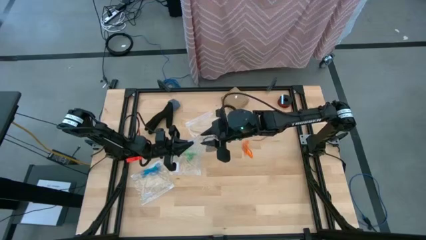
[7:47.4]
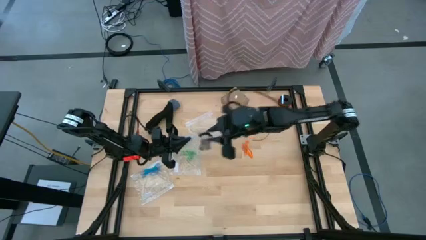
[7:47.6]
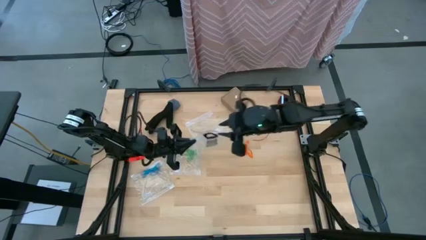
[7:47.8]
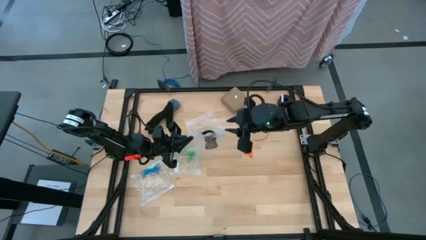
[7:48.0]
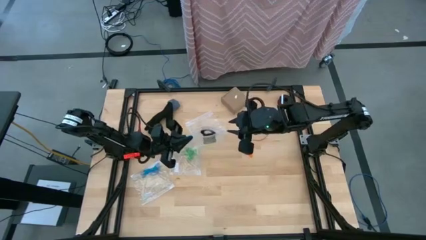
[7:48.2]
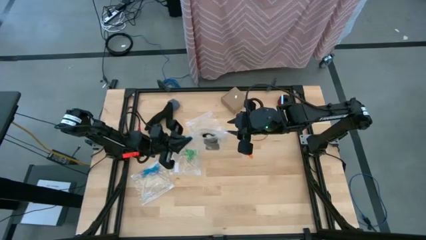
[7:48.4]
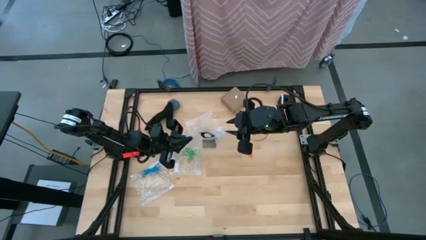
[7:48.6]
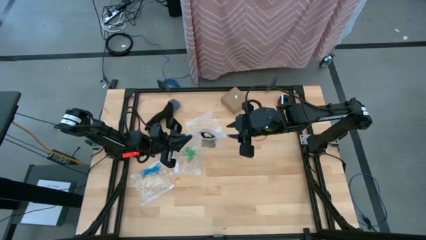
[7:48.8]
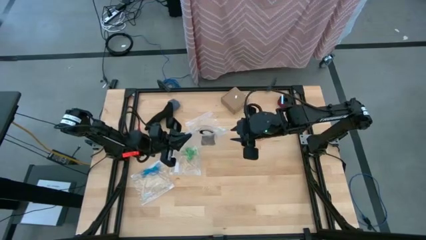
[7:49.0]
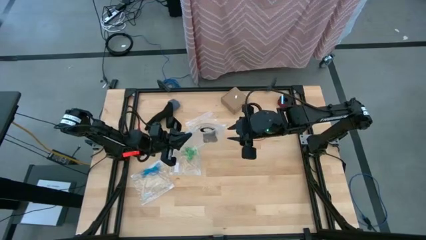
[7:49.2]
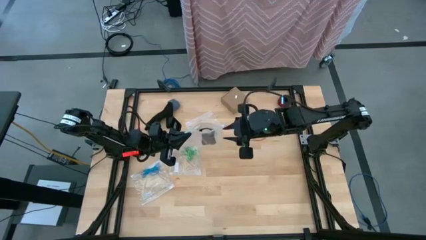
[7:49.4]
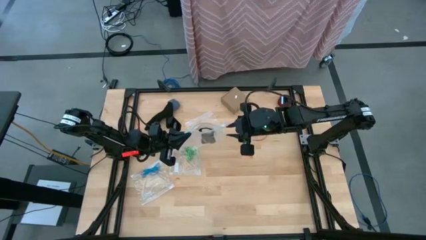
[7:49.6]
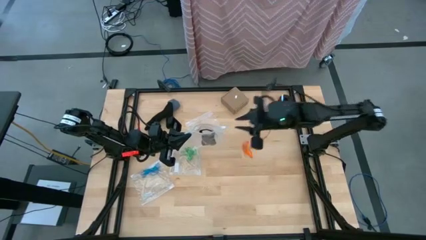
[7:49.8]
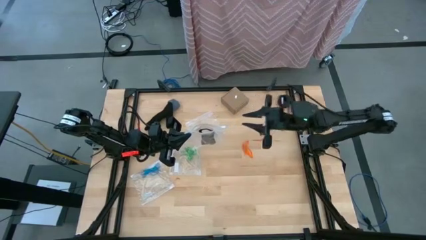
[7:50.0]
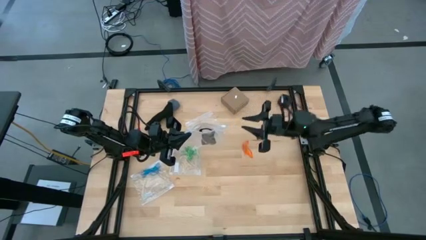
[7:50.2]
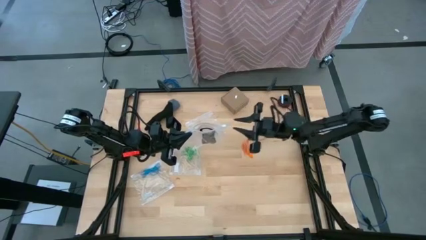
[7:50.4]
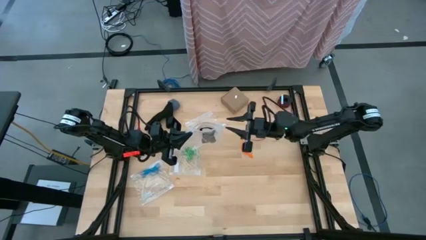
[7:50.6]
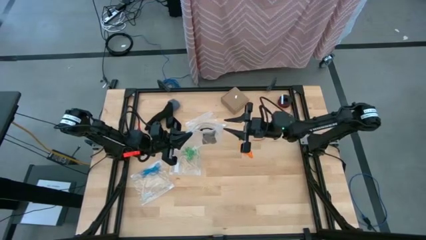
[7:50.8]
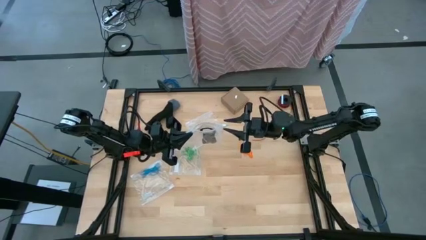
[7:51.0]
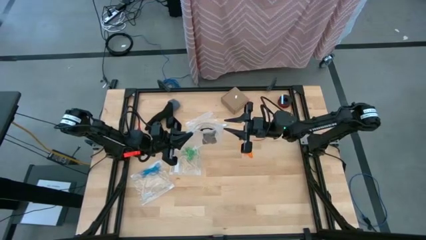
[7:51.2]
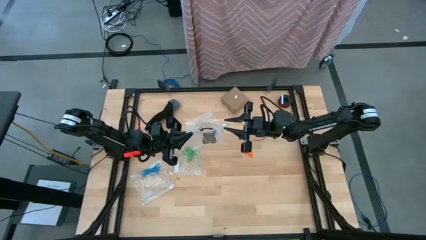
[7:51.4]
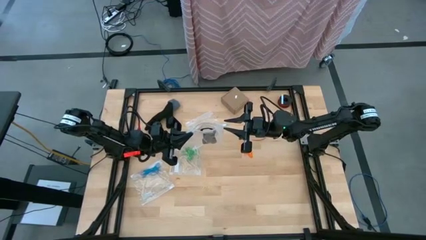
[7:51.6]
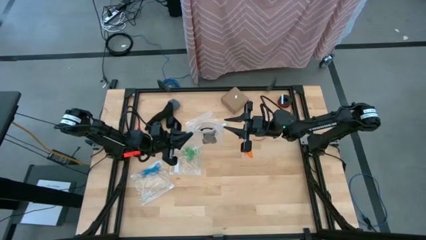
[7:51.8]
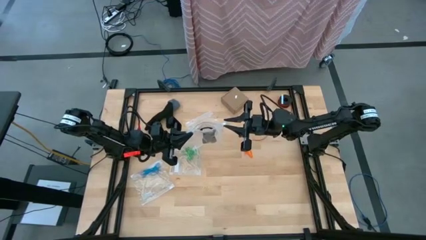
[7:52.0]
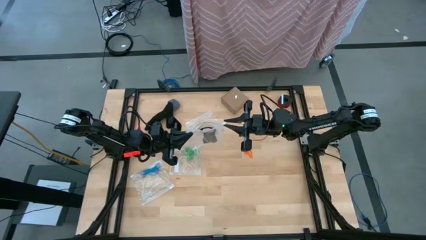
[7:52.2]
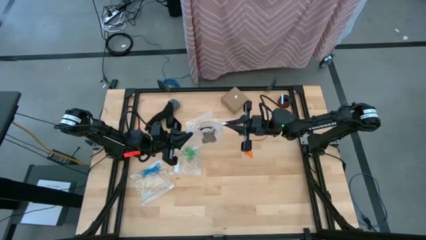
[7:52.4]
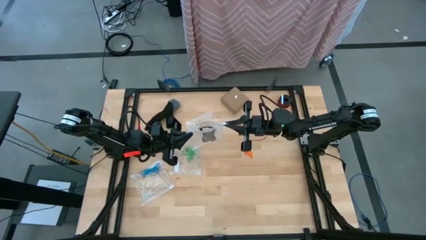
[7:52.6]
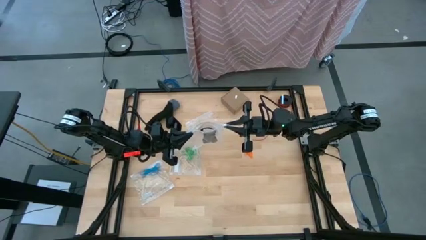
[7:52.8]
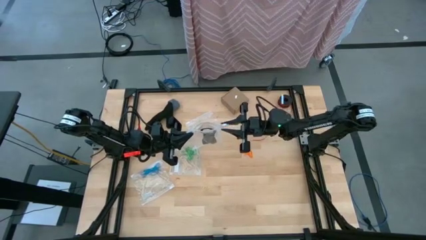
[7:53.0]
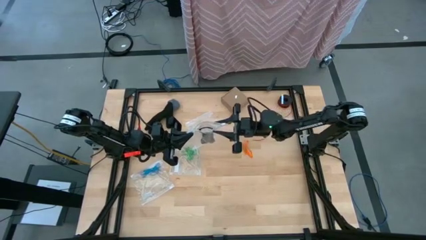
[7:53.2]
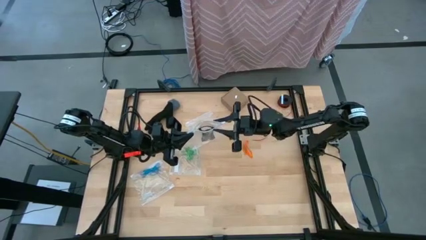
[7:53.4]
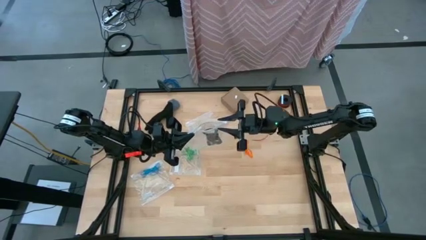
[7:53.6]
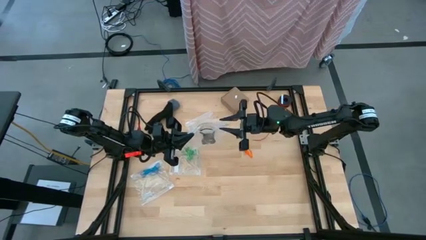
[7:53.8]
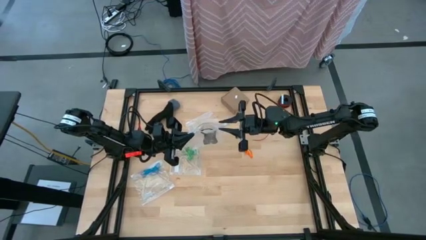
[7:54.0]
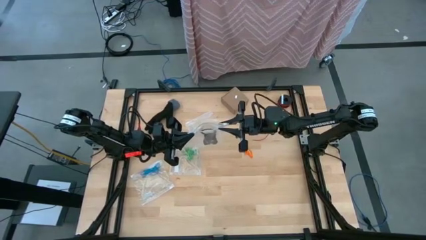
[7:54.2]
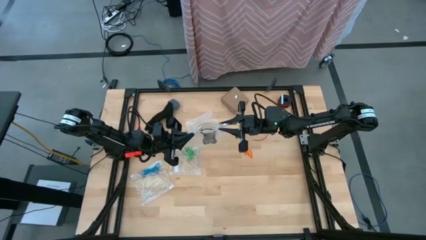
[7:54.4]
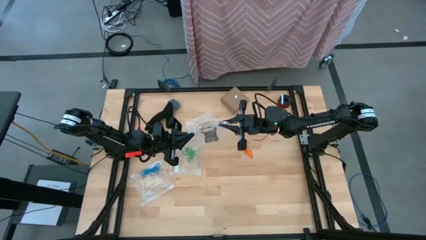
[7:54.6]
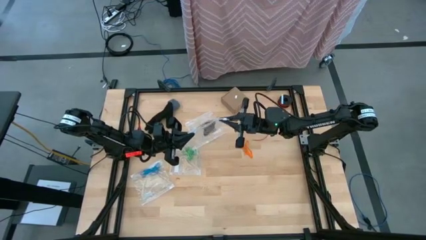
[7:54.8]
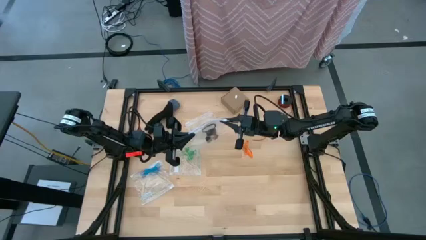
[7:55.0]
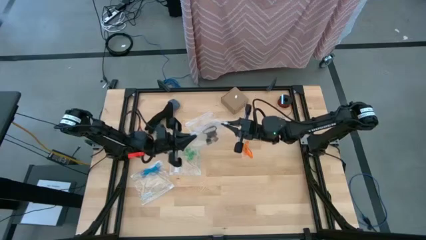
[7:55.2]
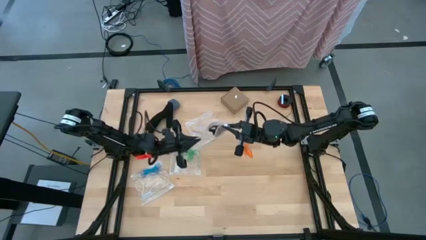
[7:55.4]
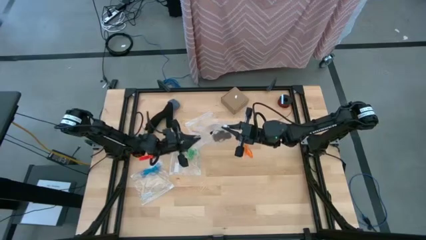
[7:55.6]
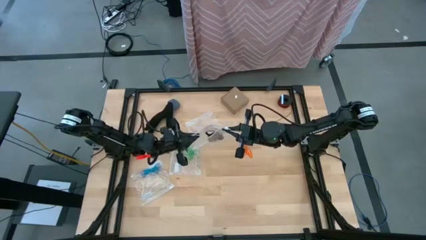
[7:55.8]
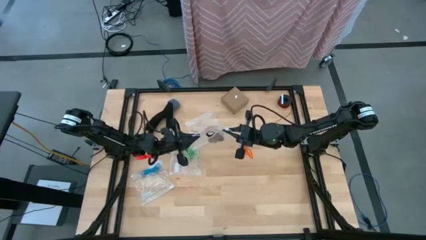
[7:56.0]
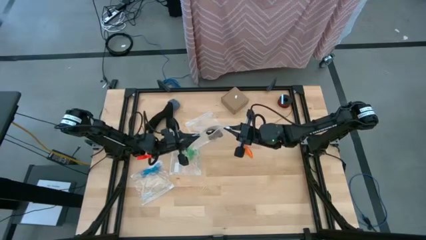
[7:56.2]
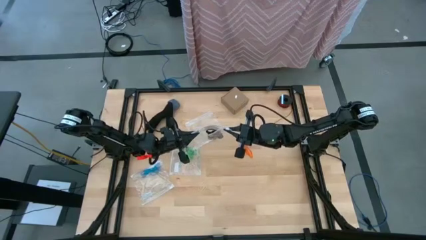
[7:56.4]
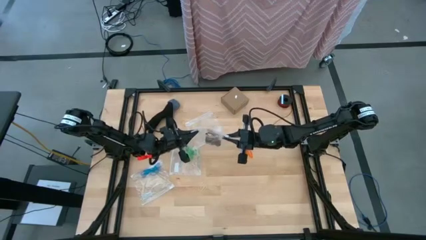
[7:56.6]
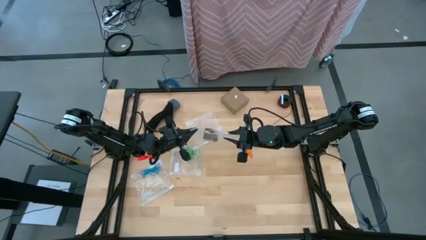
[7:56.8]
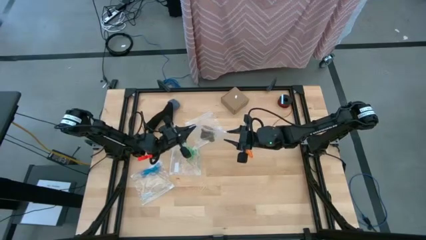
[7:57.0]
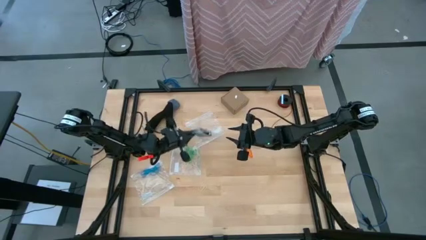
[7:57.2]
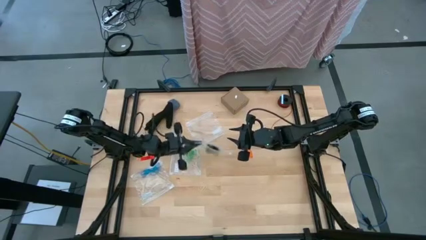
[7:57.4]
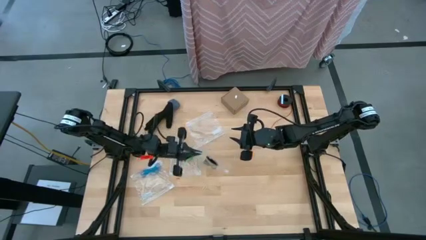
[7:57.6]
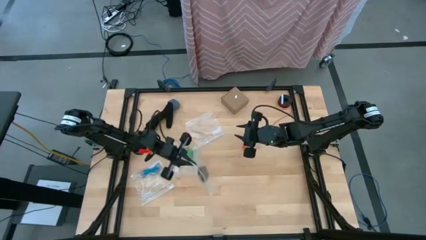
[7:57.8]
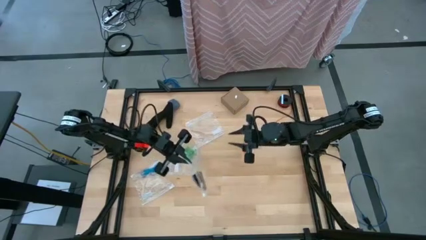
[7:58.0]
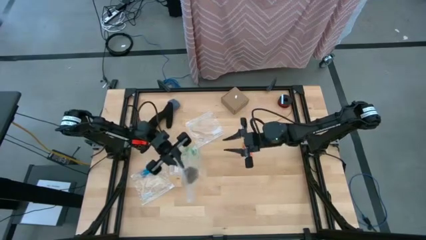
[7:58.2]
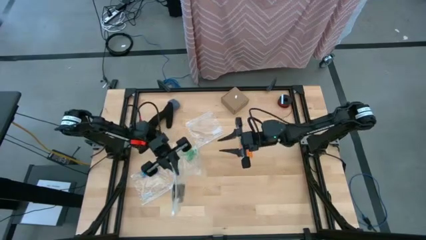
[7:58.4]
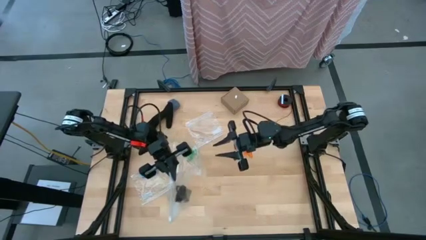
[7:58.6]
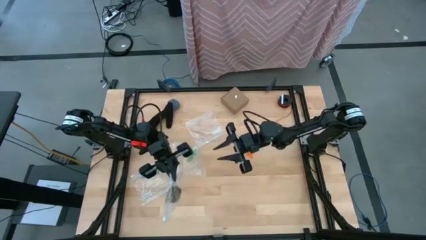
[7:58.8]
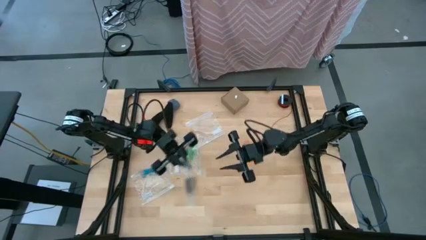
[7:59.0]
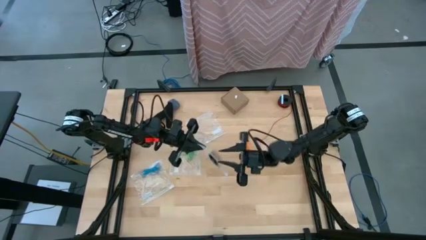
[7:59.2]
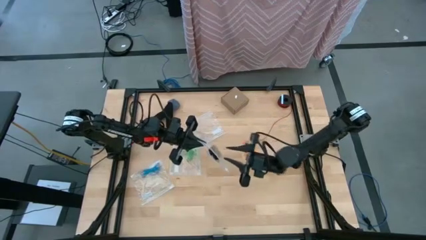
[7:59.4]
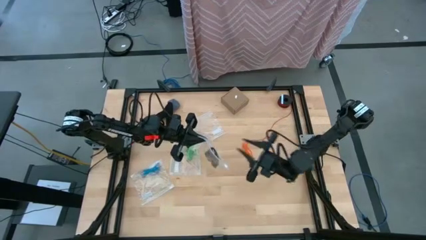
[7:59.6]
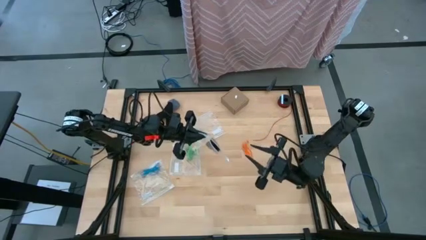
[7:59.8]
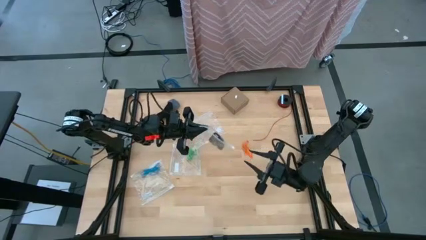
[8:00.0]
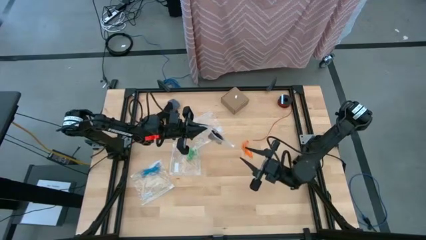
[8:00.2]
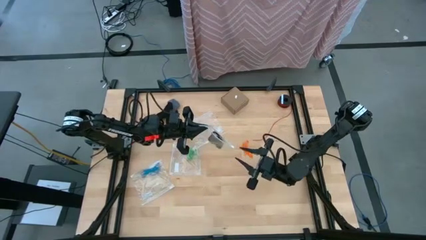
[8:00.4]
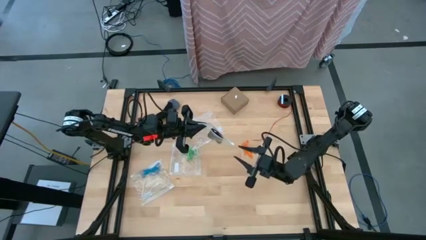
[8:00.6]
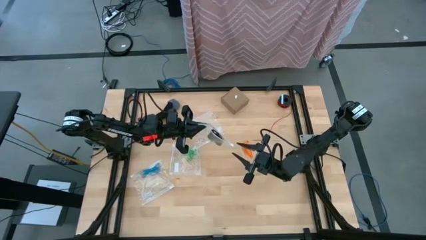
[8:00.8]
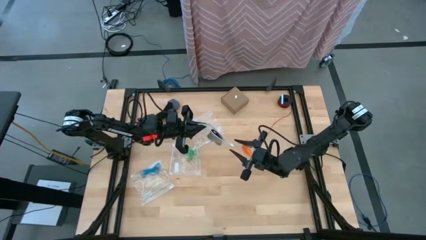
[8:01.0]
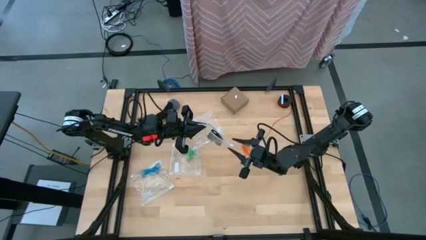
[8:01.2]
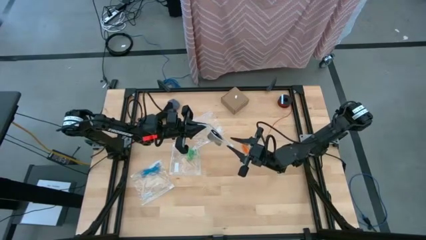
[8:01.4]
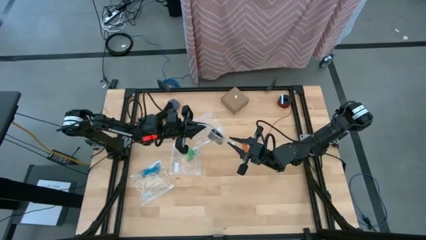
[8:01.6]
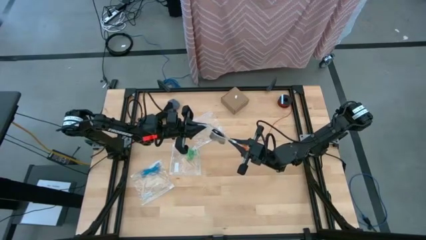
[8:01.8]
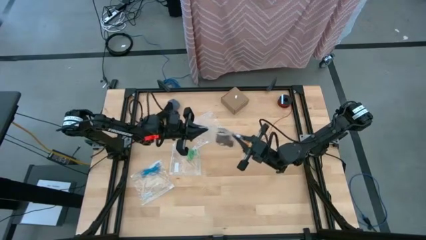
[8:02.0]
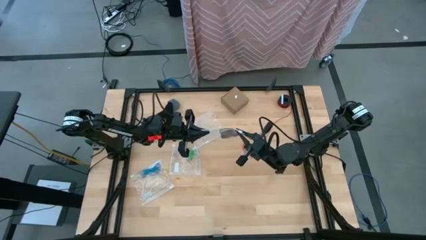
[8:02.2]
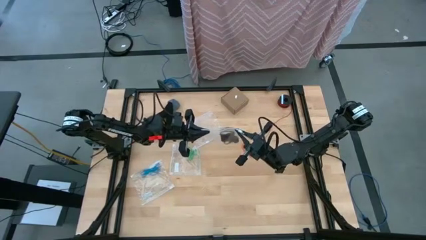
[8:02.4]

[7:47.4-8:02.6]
Task: Sort rubber bands
Close the transparent zip bag

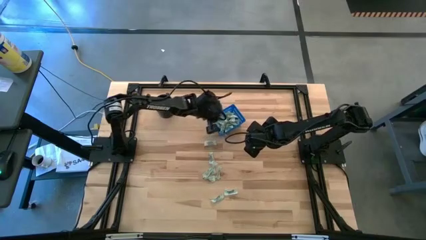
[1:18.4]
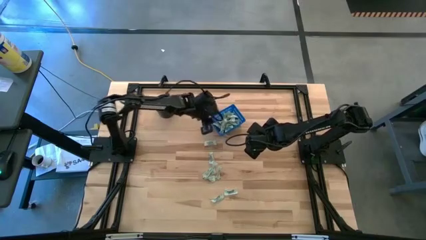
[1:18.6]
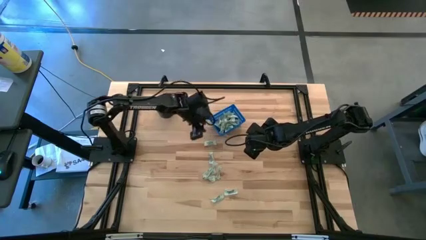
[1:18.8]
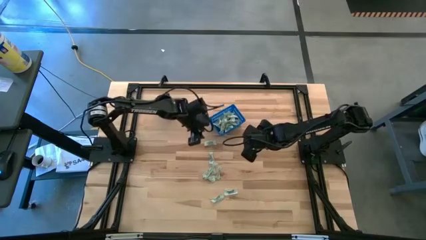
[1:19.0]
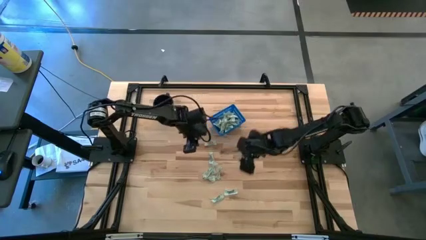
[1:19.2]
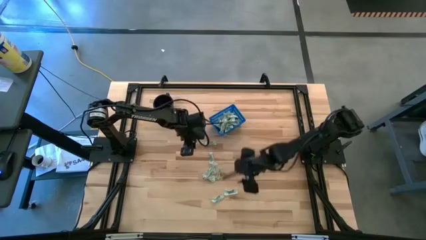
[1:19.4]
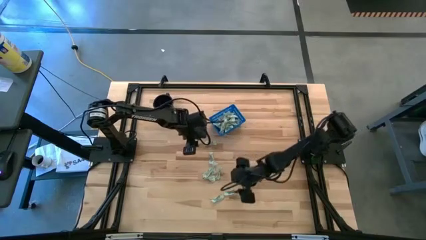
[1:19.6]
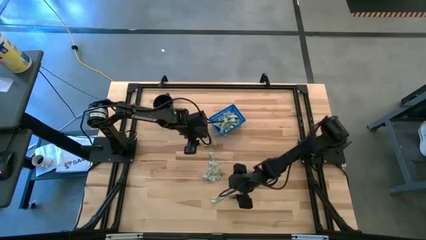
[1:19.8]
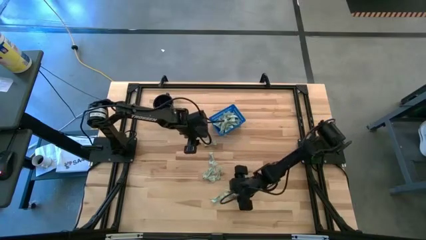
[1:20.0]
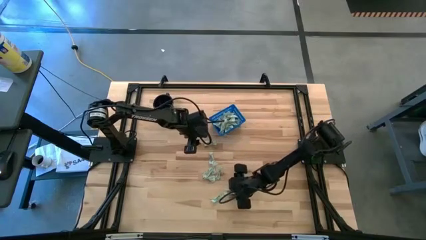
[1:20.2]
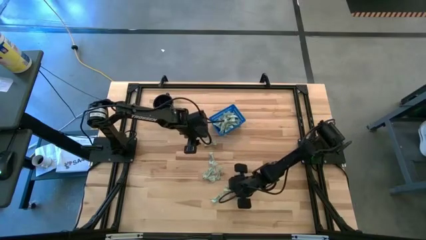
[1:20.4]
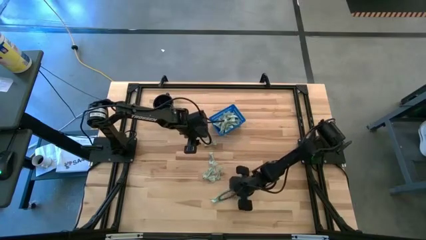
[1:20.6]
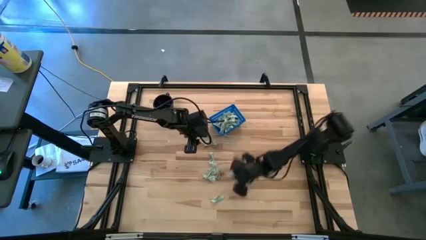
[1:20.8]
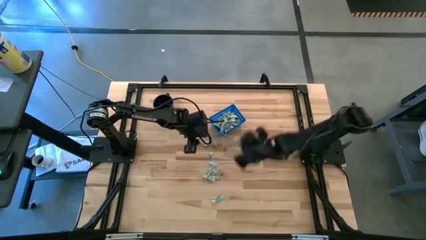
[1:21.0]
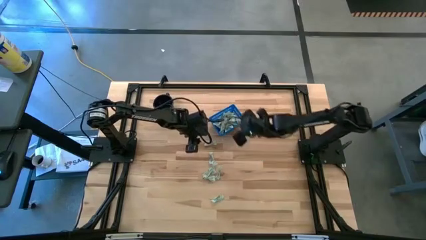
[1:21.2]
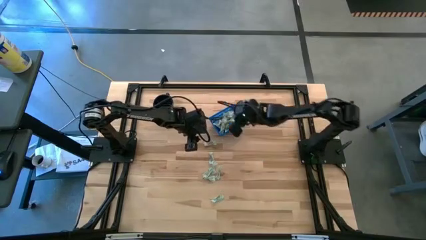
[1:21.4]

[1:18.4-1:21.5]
Task: Pick and place Stevia / Truvia into bins
Put the green stevia packet into the blue bin
